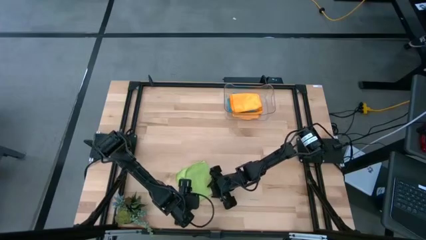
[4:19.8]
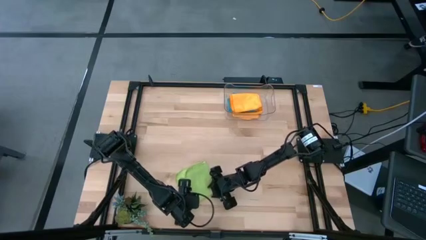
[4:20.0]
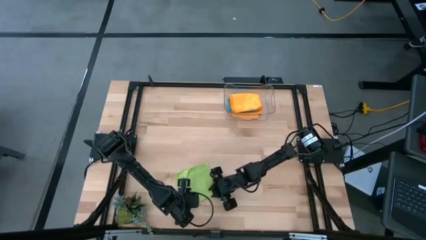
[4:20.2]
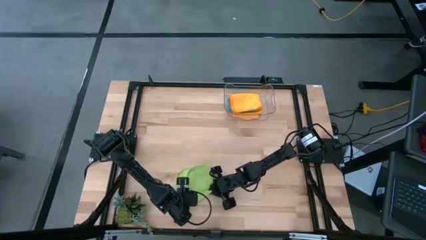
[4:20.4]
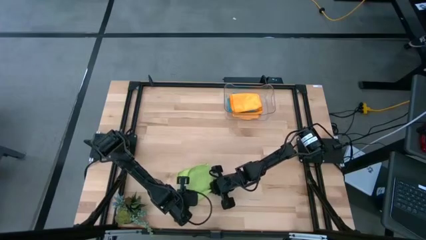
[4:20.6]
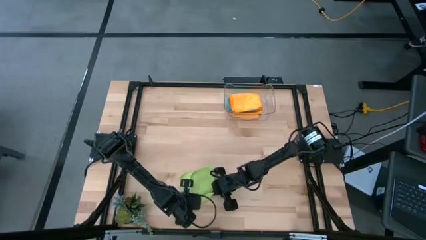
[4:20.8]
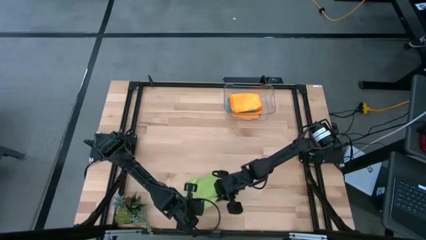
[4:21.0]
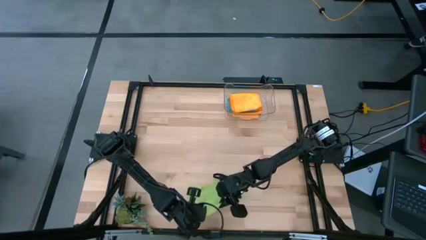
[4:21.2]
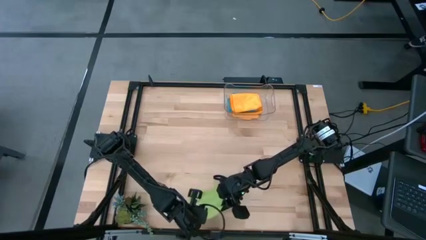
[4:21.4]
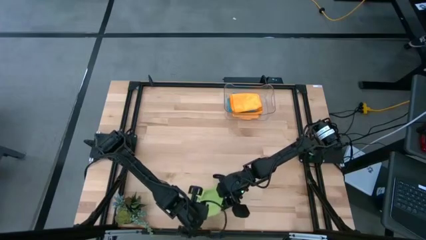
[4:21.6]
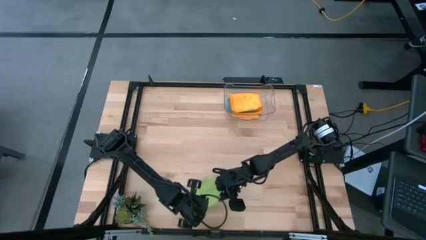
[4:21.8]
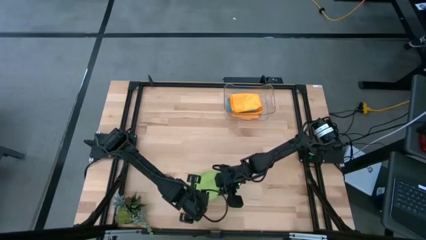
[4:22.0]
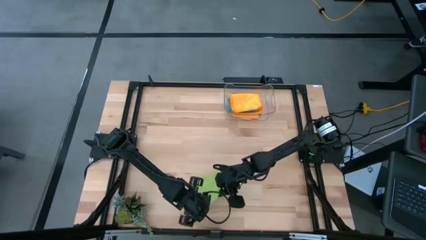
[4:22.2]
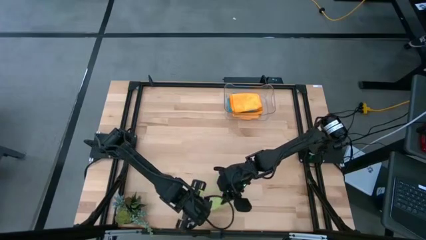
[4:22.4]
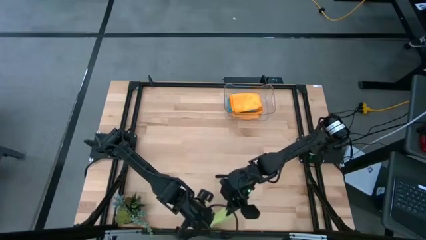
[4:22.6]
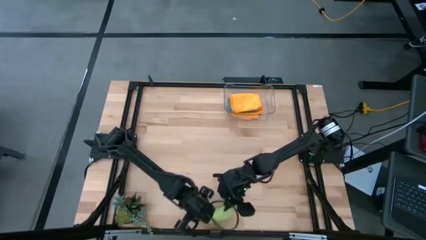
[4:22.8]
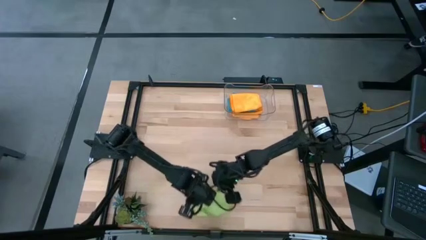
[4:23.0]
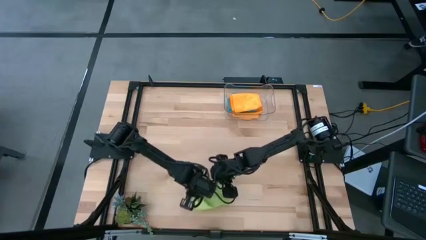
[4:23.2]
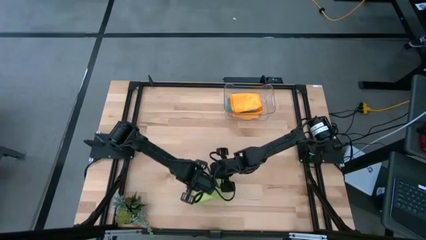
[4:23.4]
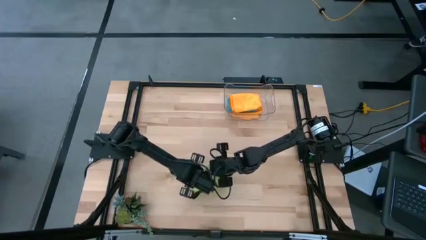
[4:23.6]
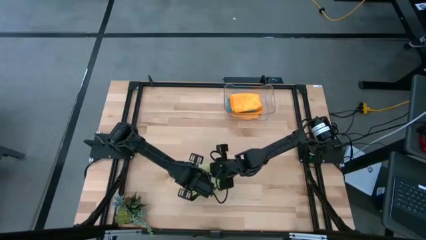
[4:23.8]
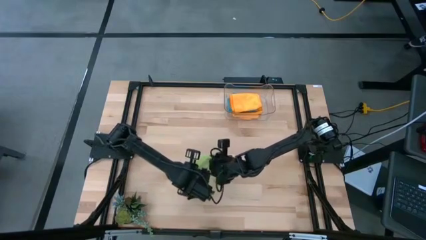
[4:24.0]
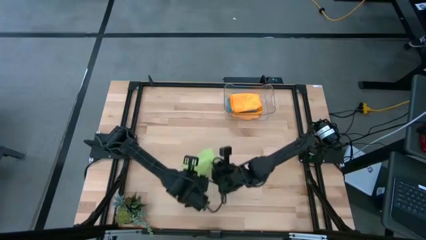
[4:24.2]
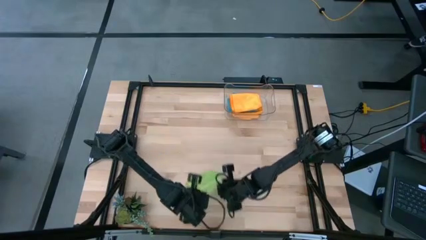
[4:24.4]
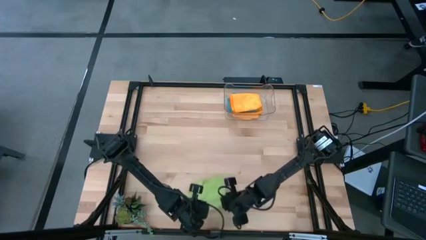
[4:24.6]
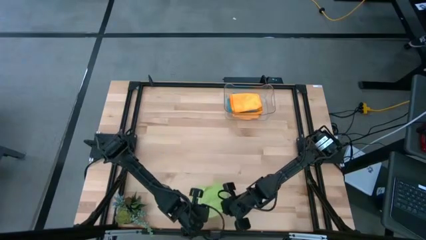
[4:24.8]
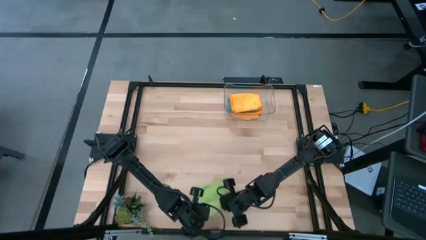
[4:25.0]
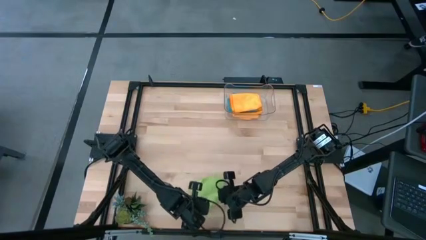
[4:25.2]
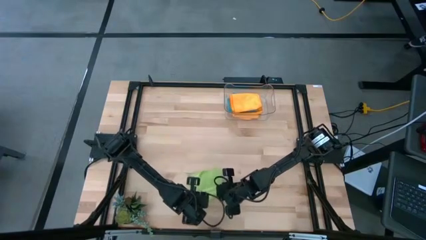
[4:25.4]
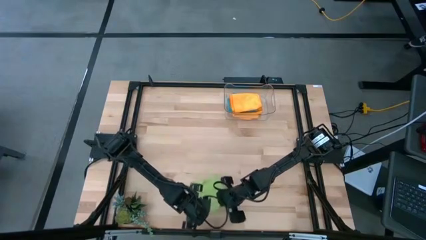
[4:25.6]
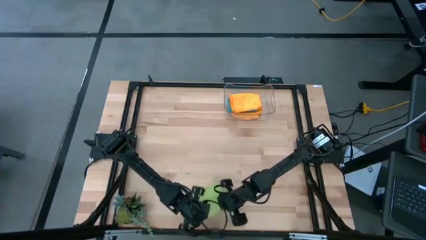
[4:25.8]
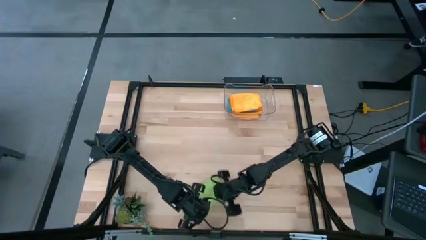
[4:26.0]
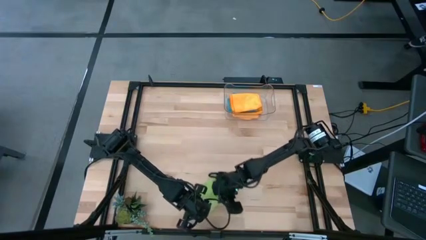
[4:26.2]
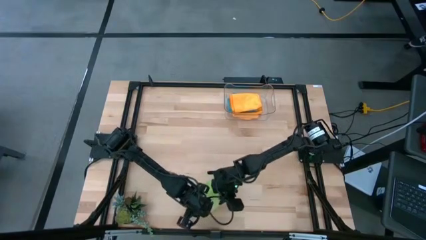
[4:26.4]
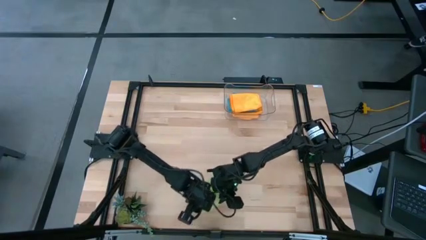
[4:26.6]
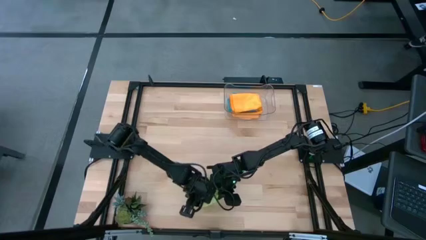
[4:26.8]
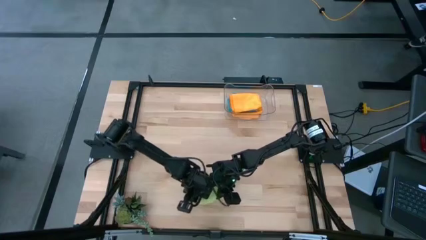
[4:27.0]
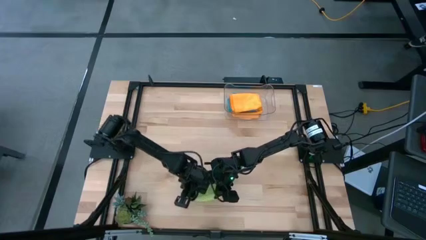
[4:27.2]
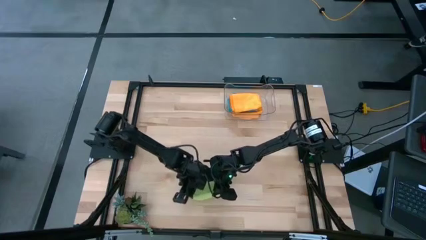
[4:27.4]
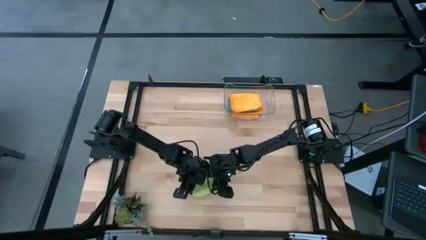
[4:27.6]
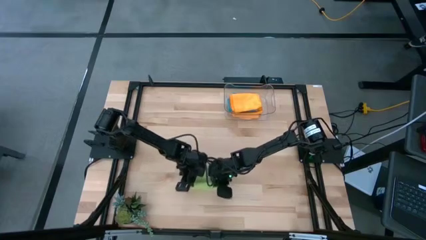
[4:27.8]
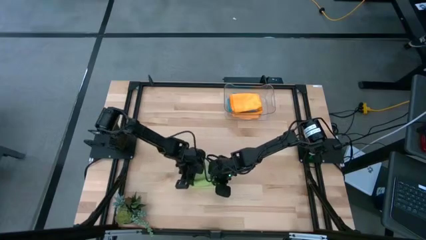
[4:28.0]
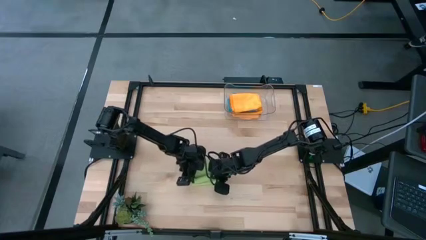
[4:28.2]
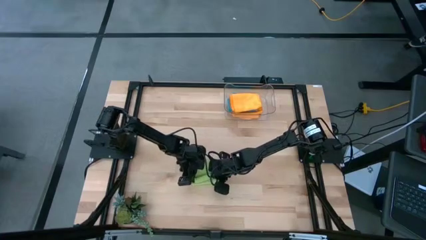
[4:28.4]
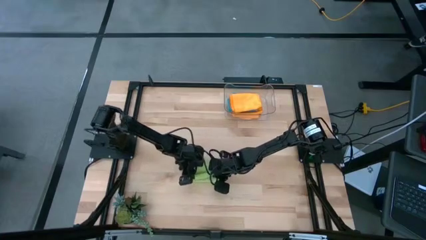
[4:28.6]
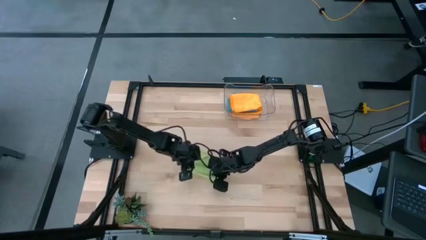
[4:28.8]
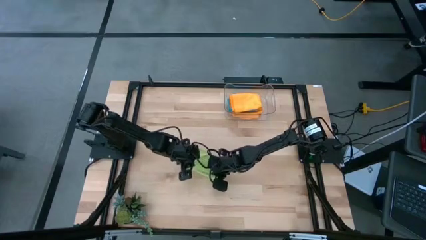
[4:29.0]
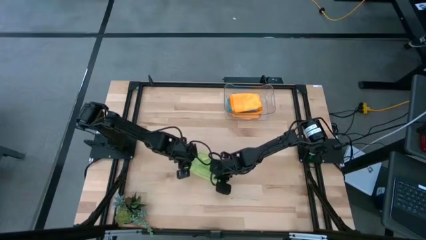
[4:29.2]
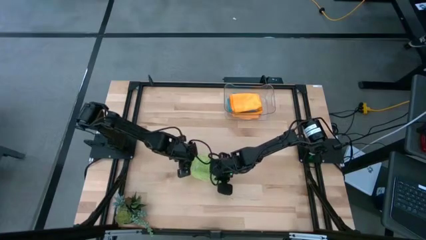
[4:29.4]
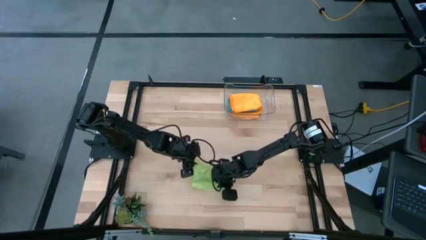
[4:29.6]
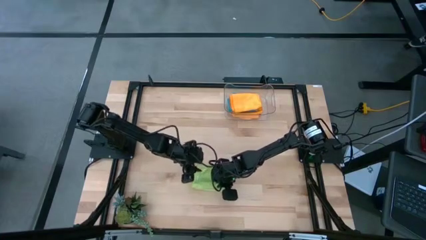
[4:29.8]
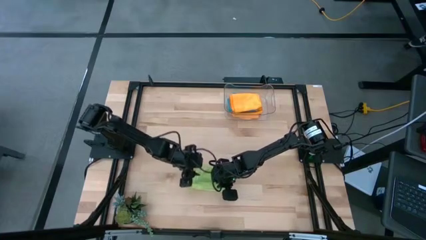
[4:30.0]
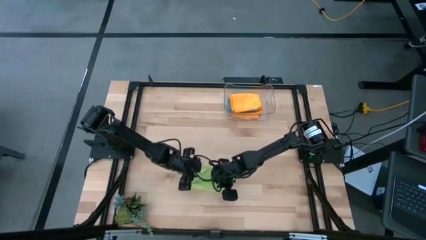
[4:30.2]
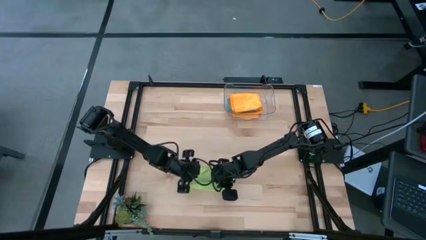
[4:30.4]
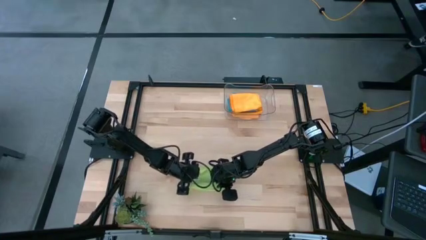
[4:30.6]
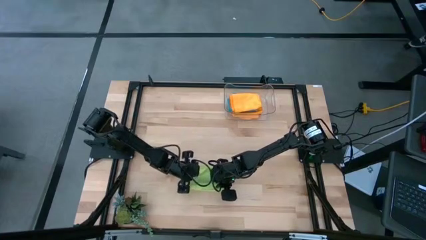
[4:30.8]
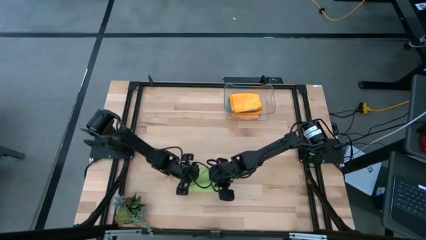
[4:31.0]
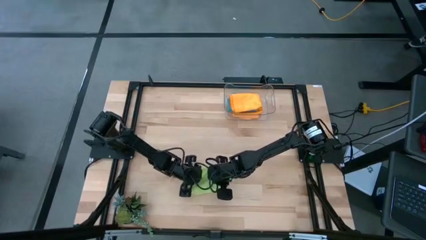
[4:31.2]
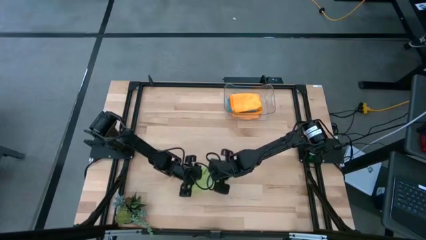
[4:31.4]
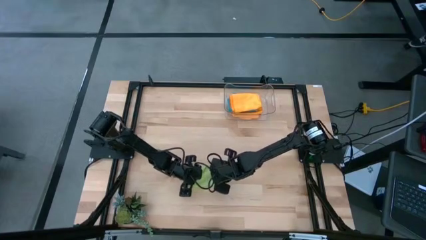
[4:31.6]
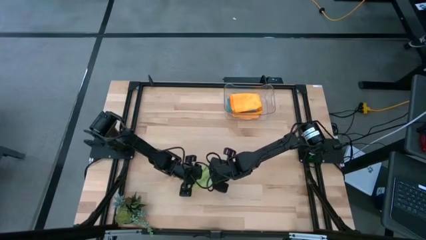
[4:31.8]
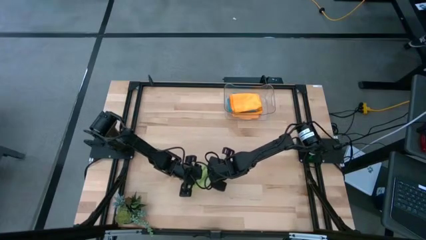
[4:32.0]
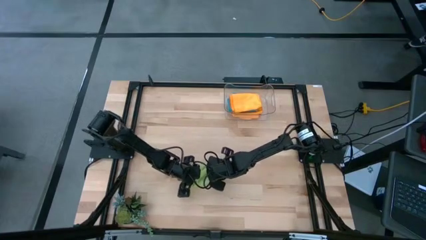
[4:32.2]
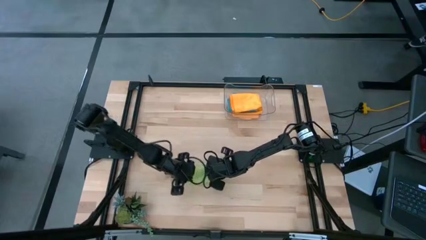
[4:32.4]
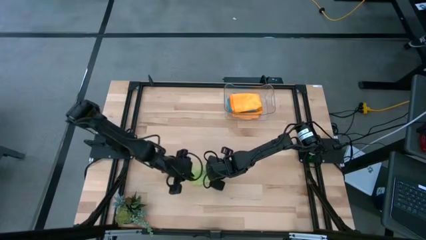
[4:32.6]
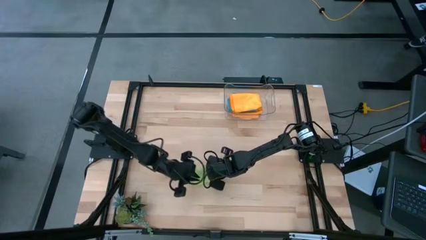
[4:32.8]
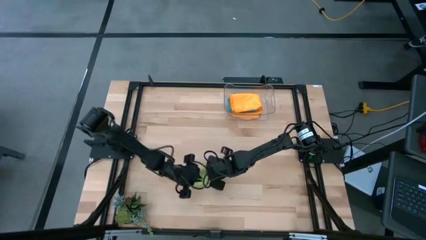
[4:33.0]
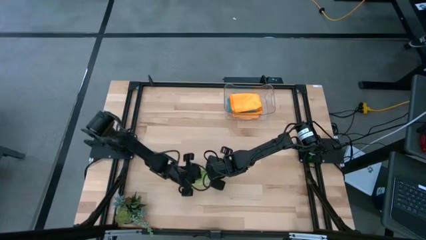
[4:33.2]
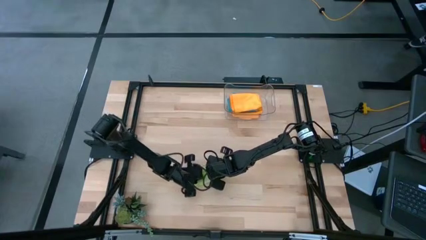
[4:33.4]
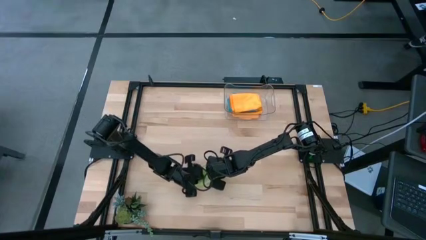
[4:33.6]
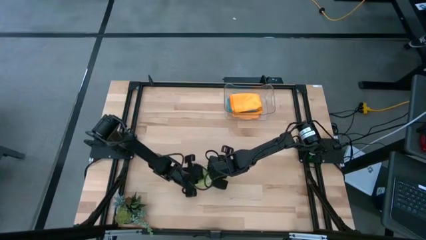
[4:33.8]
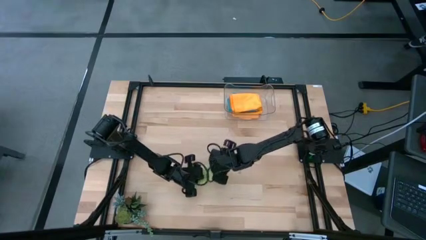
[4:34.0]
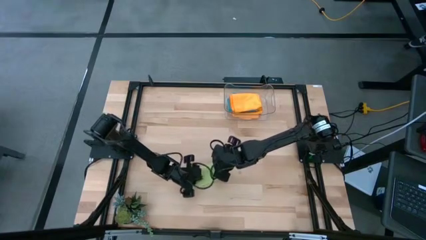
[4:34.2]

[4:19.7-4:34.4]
Task: Fold microfiber towels
Fold the green microfiber towel
